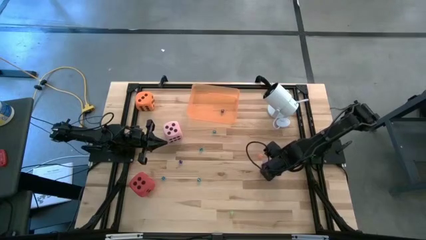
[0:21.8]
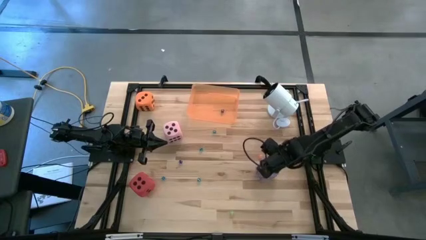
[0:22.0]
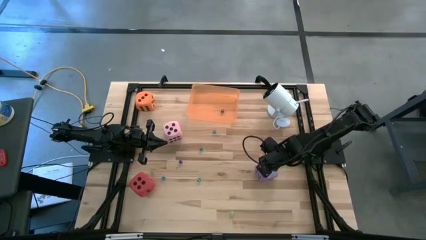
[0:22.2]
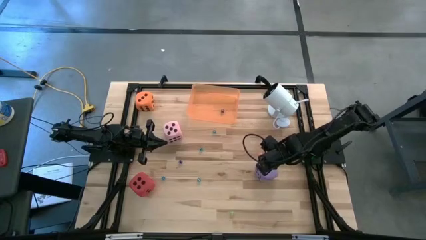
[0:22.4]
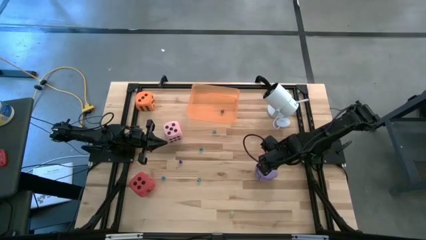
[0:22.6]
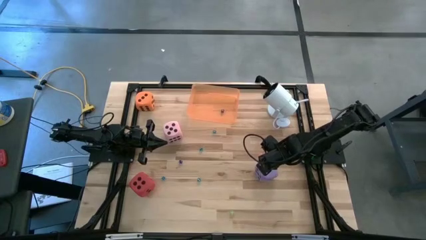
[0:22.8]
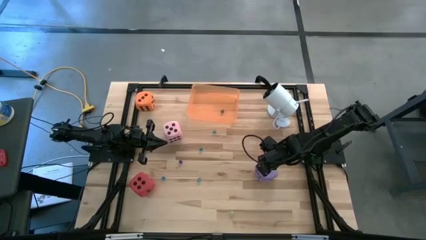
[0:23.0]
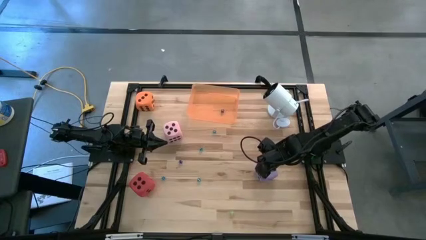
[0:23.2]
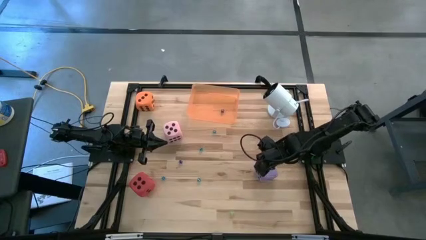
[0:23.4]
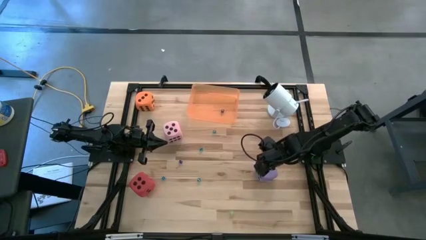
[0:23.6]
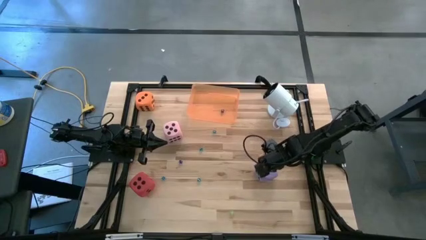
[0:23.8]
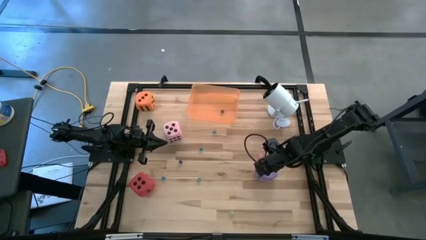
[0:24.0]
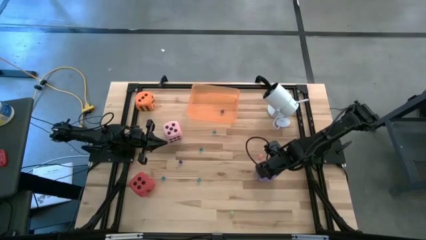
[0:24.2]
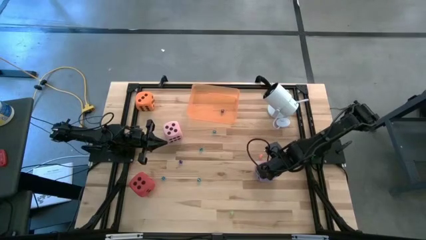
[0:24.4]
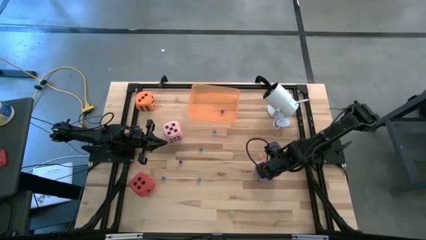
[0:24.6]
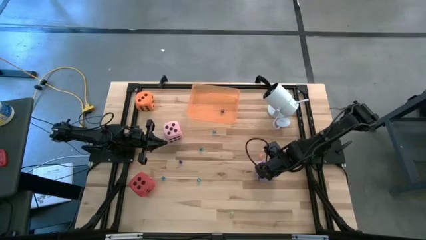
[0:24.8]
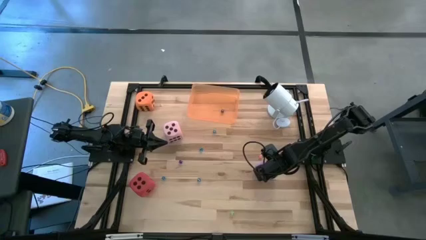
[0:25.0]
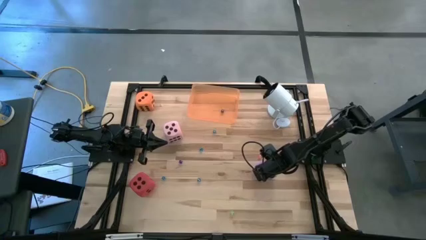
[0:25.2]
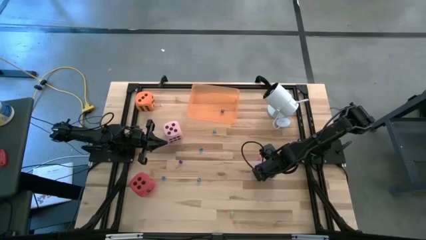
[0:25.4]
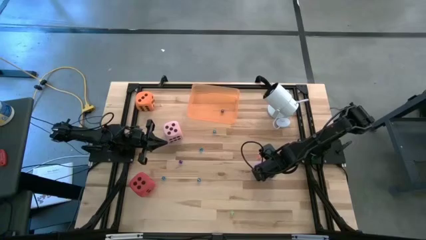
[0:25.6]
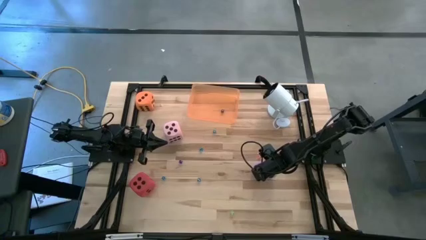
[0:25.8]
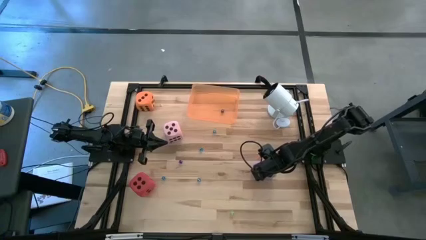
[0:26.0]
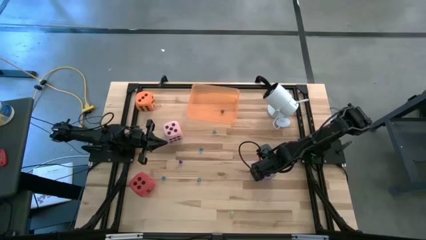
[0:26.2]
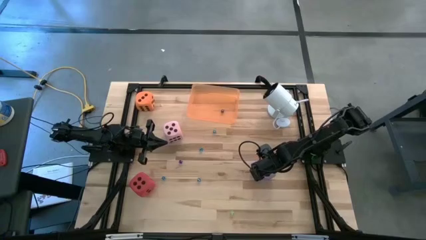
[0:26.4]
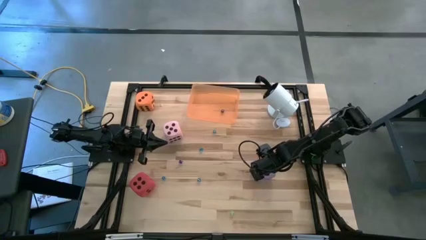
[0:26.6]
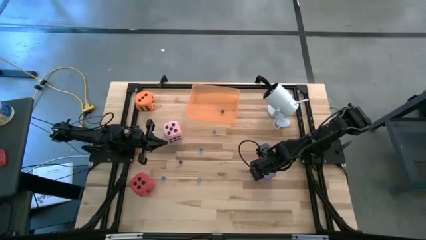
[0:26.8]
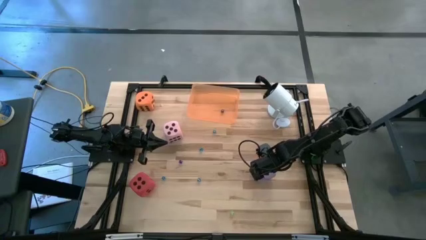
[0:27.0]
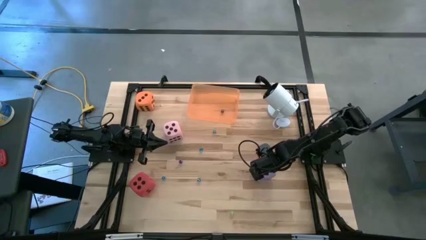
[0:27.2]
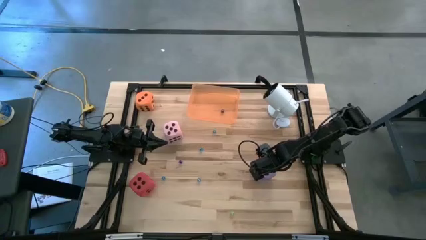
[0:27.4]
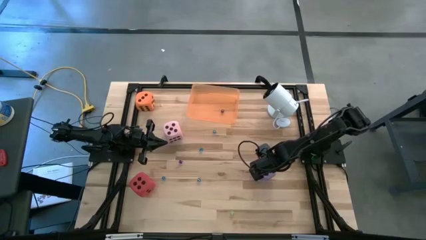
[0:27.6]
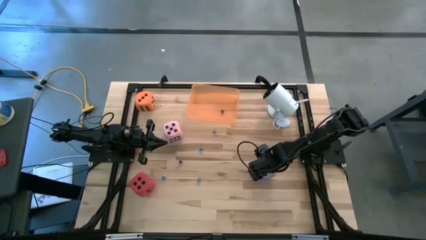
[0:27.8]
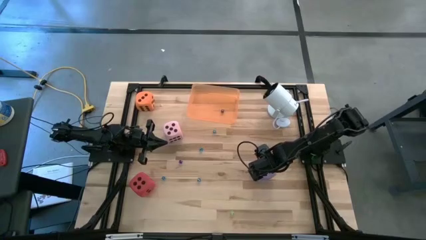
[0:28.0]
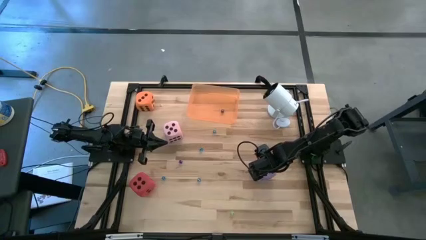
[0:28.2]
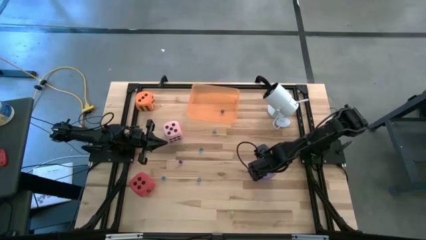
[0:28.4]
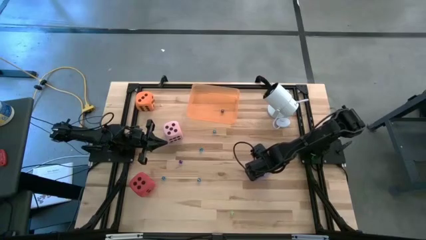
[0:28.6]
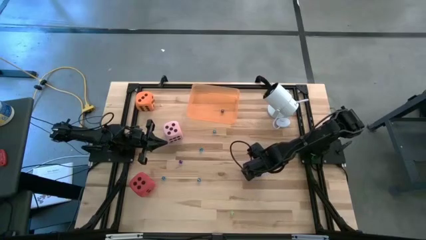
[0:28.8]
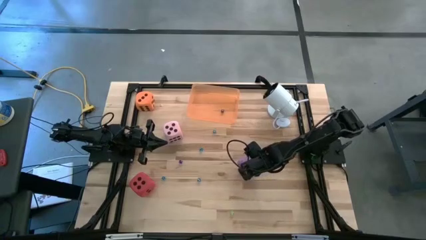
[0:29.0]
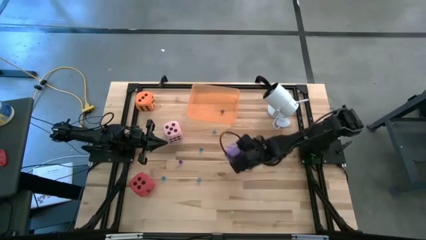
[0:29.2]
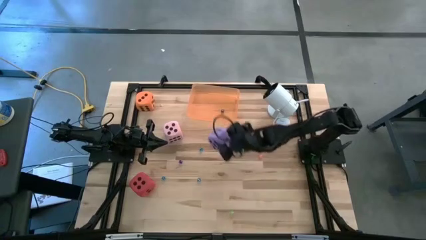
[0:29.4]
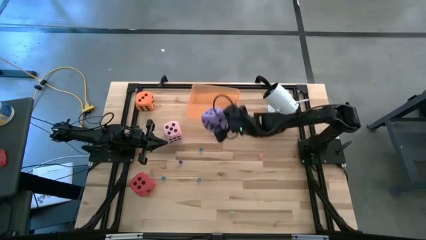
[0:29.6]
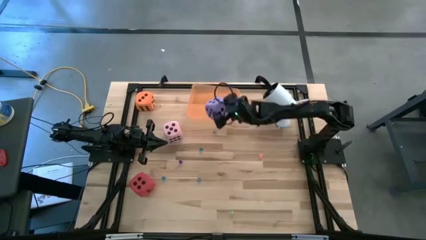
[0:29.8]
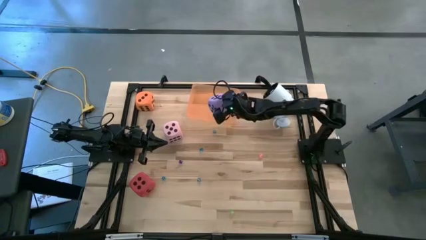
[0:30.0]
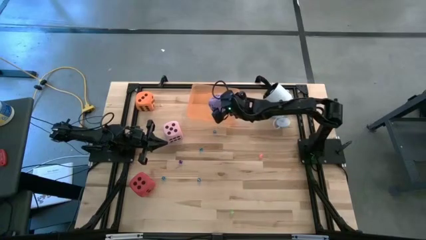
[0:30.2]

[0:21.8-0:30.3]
Task: Pick & Place Dice
Put the large blue dice in the orange bin

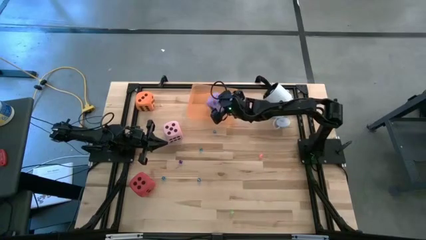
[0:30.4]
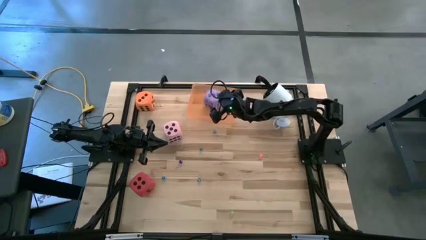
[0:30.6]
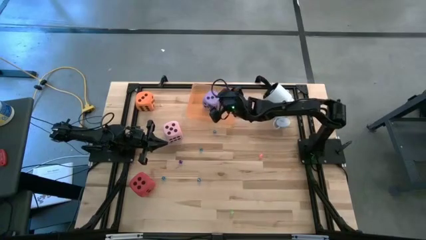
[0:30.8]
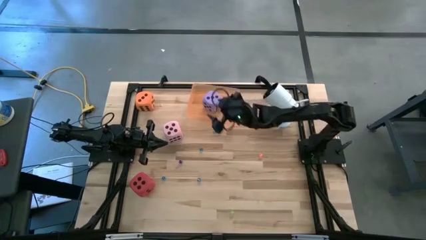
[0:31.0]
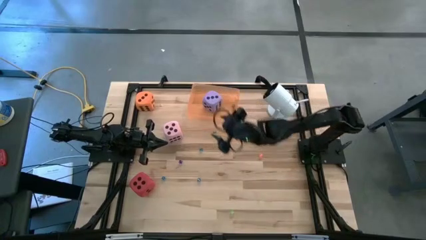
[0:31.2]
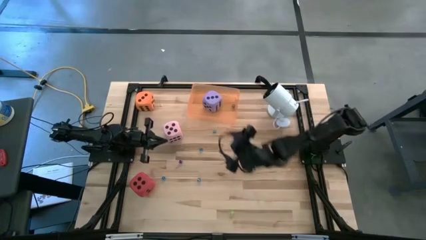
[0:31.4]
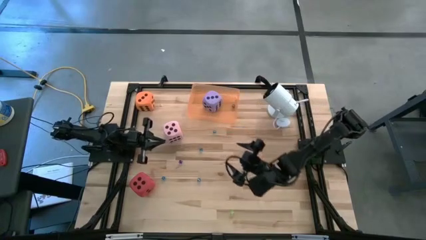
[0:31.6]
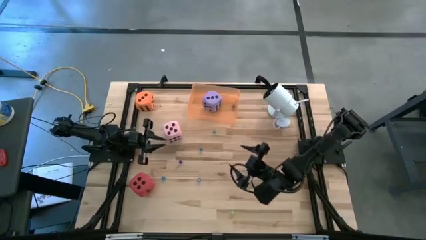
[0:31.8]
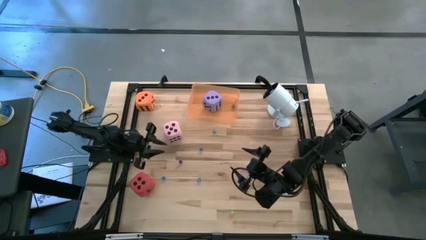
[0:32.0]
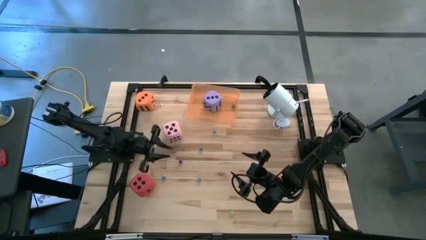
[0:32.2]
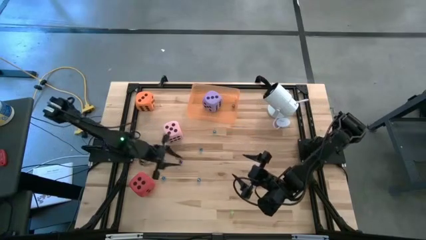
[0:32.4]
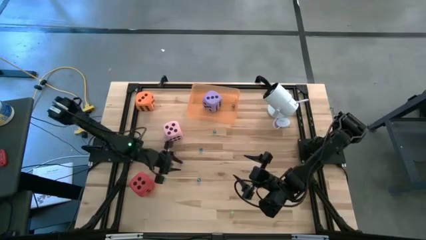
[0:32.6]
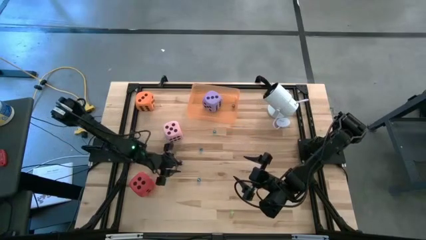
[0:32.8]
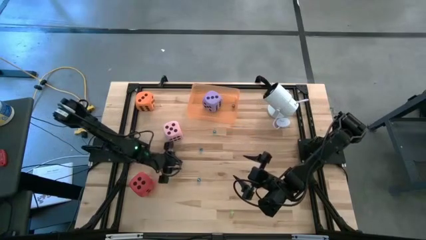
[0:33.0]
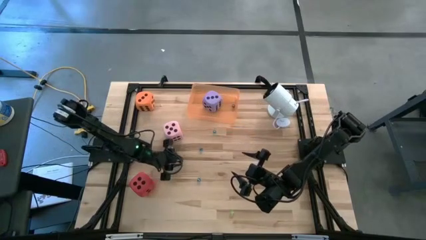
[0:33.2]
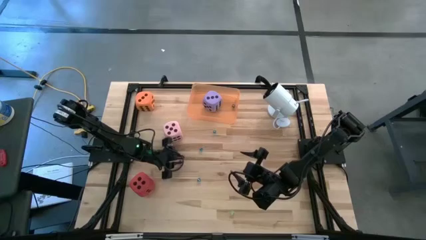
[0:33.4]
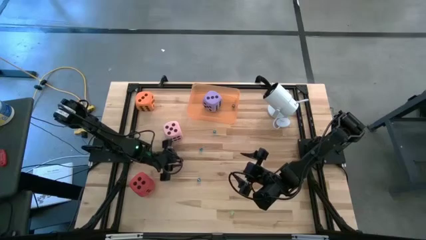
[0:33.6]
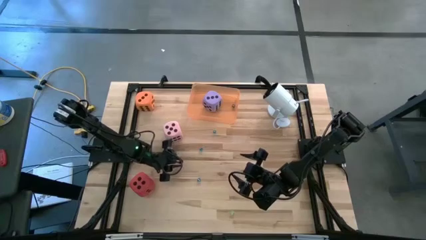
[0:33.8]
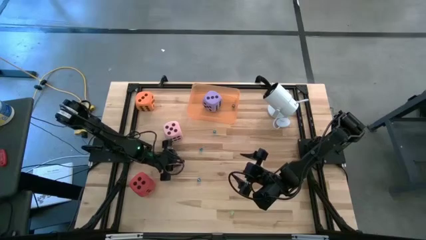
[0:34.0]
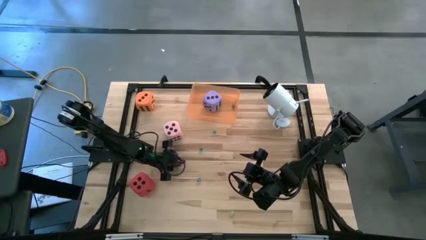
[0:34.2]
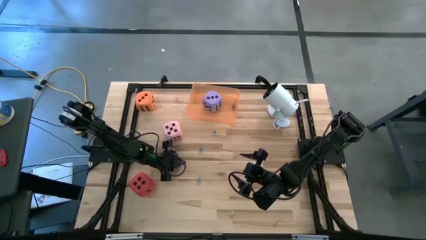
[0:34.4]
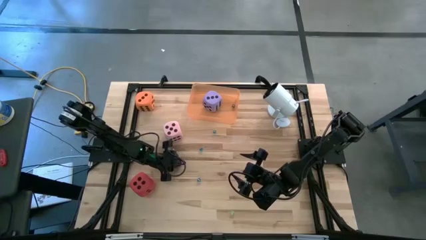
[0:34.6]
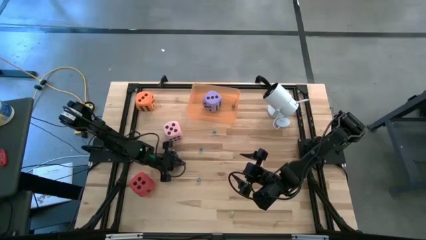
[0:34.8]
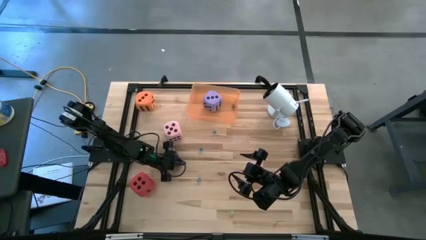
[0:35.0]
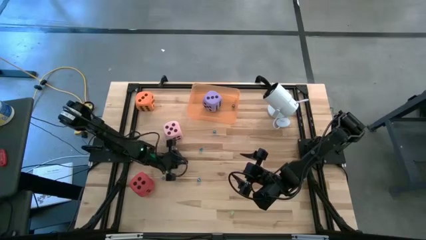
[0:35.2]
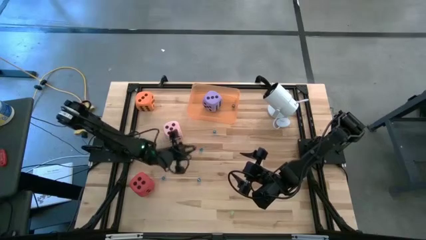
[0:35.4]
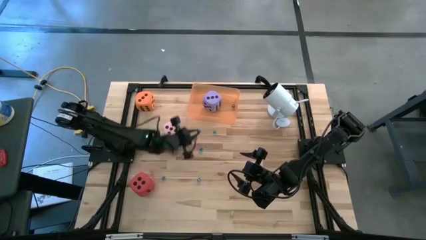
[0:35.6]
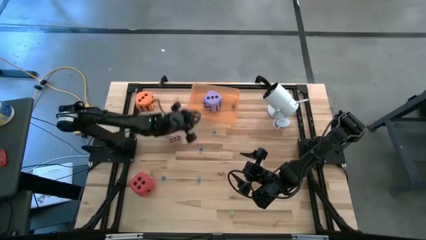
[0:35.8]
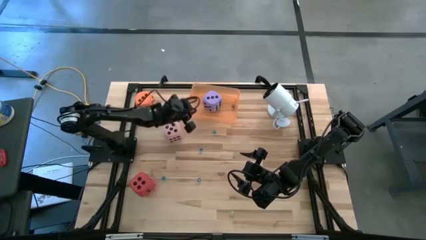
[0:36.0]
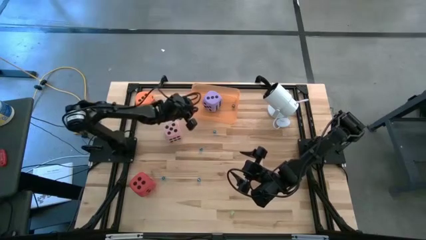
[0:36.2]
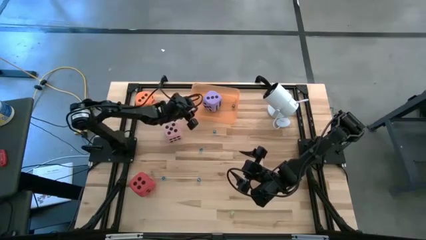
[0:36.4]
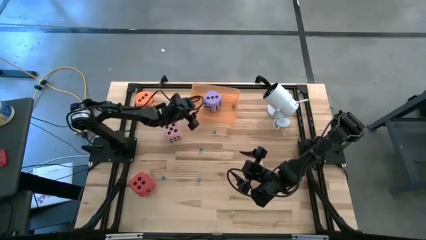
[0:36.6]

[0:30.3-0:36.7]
Put the small dark blue dice in the orange bin

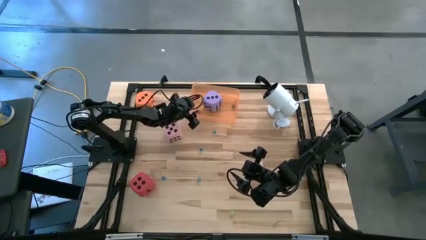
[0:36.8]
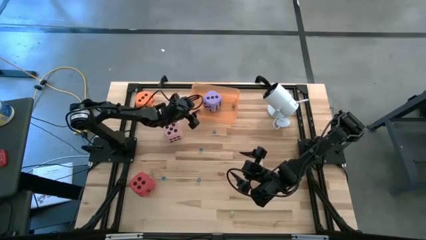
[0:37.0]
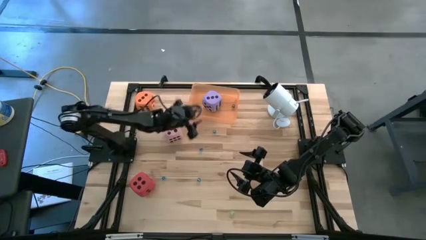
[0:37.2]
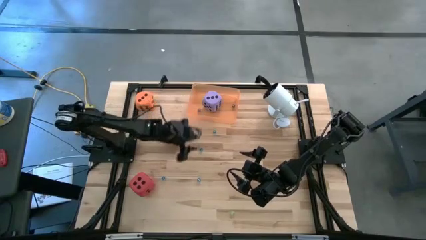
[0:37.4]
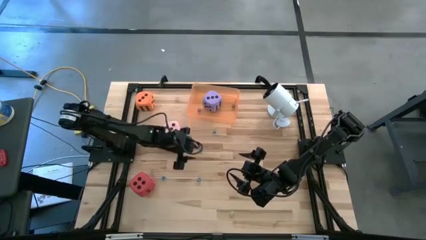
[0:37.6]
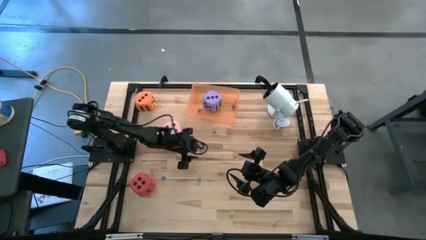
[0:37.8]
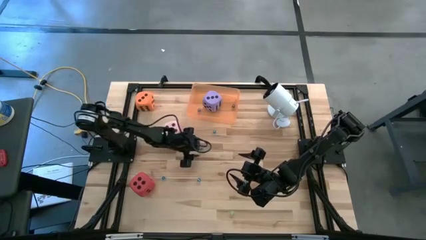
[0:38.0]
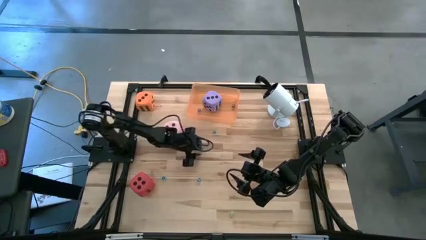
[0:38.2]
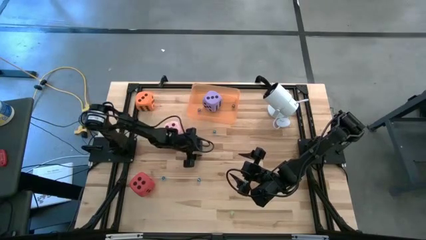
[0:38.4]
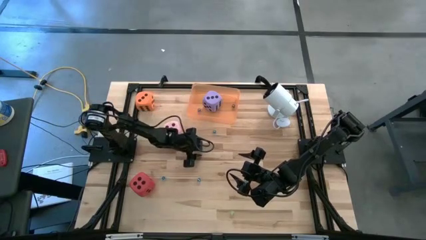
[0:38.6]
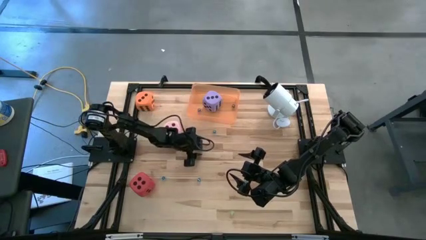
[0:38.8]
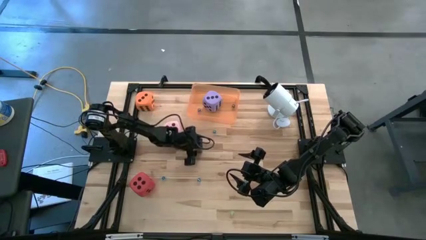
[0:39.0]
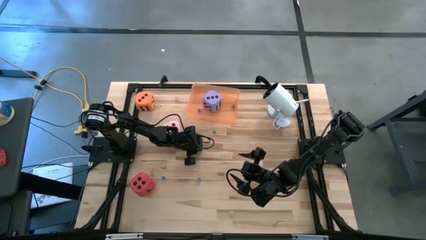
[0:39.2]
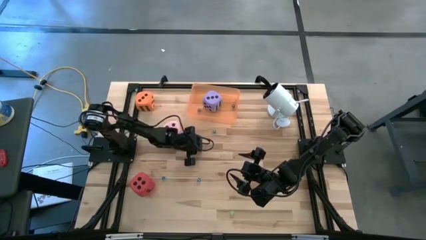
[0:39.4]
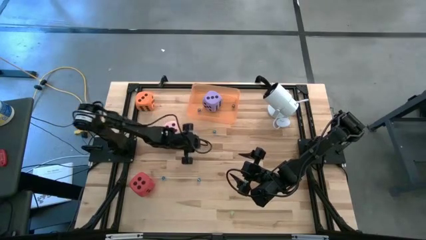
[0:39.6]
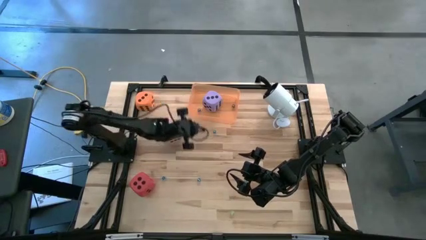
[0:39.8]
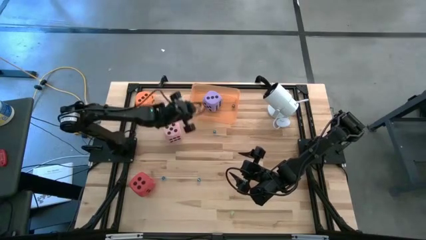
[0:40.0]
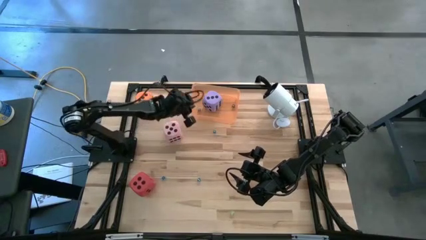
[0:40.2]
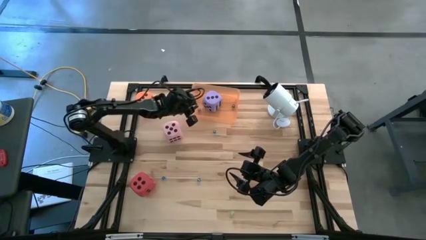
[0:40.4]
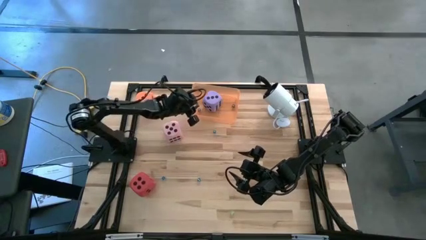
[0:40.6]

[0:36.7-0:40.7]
Put the small light blue dice in the orange bin
